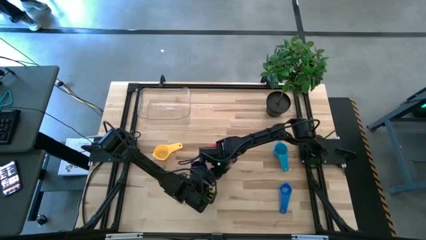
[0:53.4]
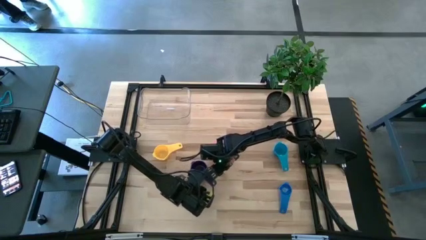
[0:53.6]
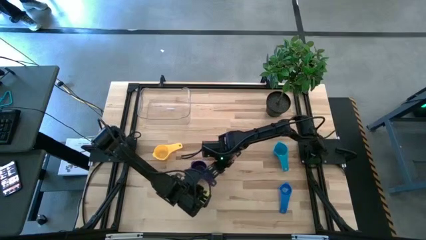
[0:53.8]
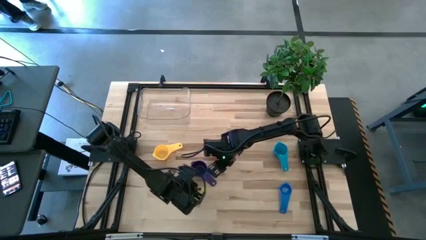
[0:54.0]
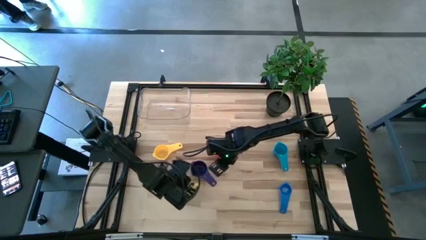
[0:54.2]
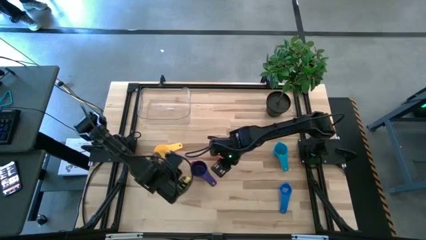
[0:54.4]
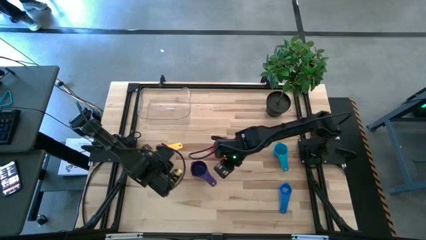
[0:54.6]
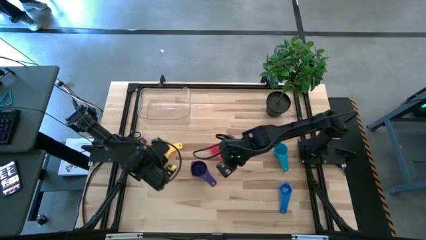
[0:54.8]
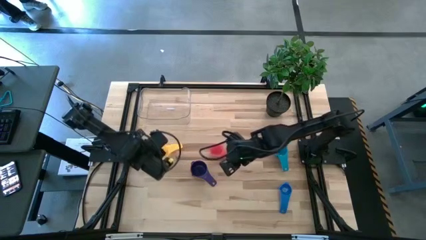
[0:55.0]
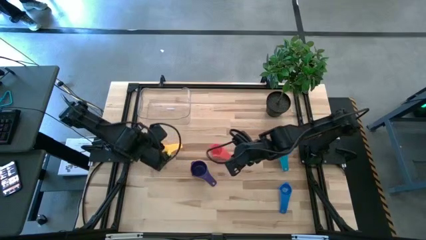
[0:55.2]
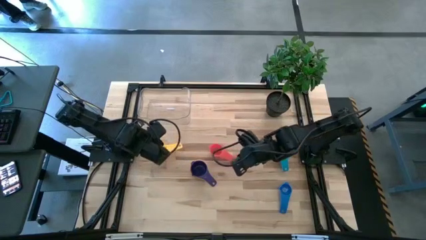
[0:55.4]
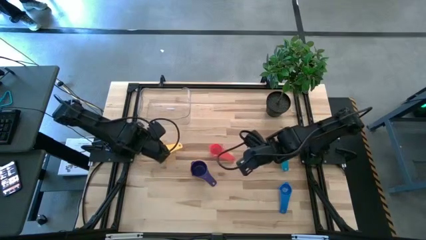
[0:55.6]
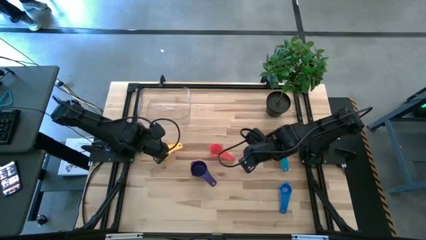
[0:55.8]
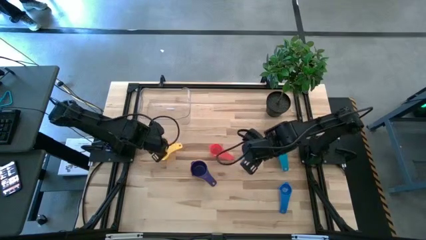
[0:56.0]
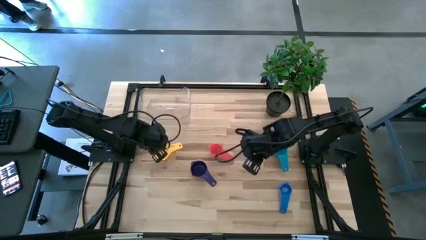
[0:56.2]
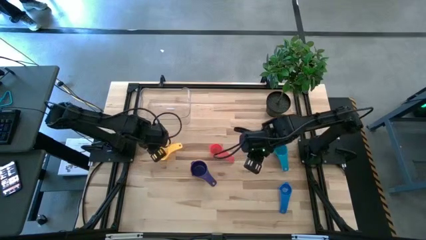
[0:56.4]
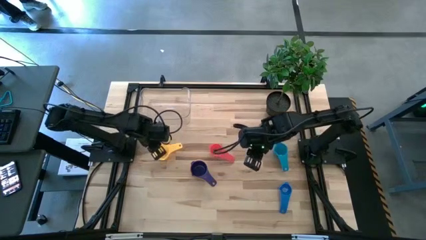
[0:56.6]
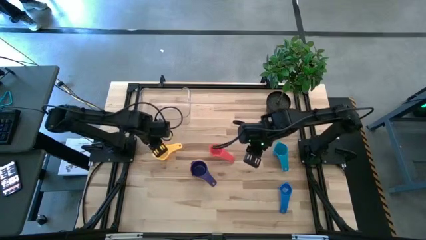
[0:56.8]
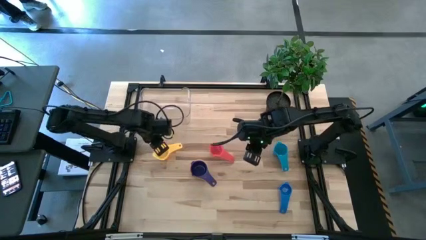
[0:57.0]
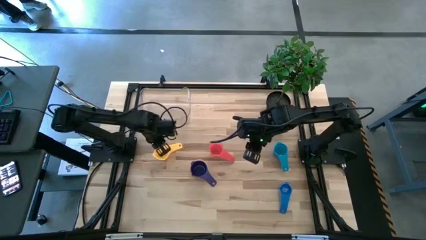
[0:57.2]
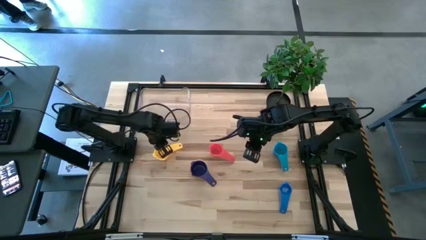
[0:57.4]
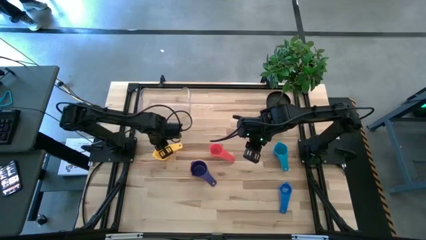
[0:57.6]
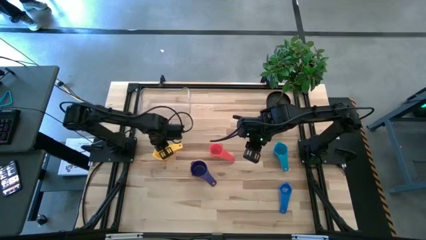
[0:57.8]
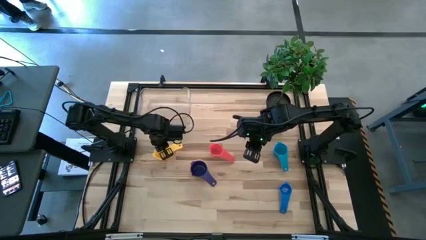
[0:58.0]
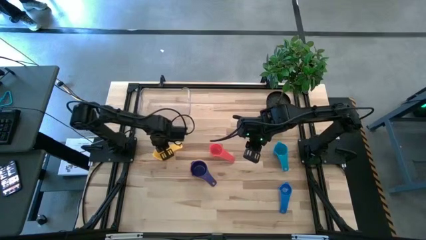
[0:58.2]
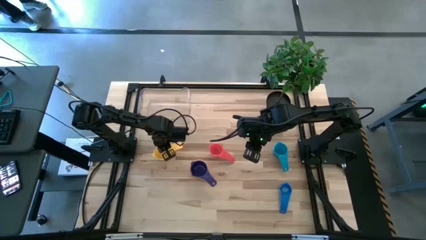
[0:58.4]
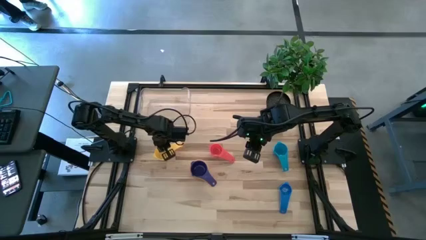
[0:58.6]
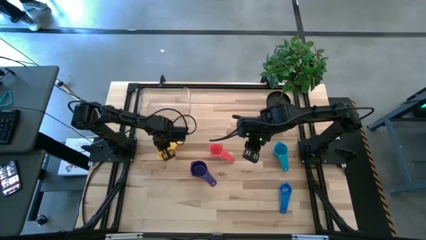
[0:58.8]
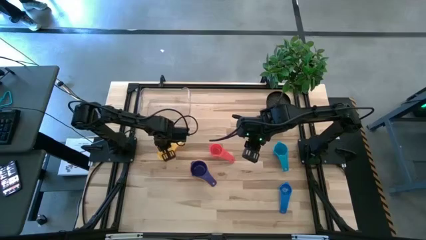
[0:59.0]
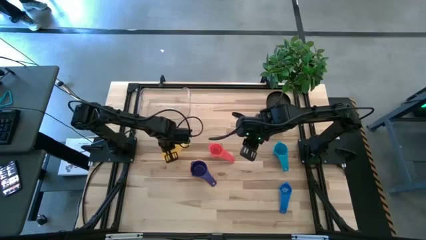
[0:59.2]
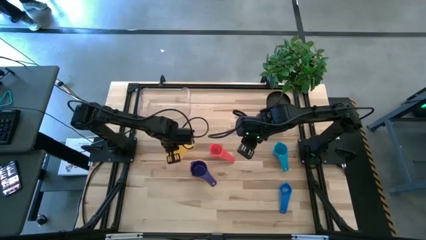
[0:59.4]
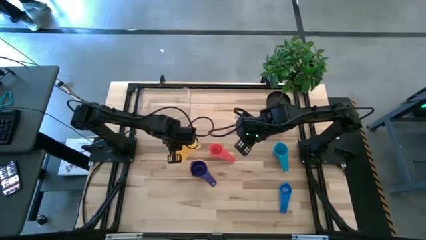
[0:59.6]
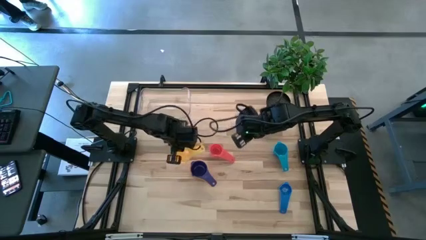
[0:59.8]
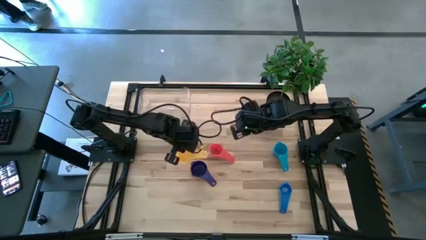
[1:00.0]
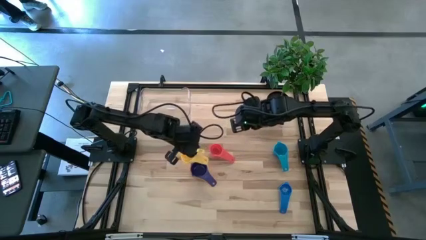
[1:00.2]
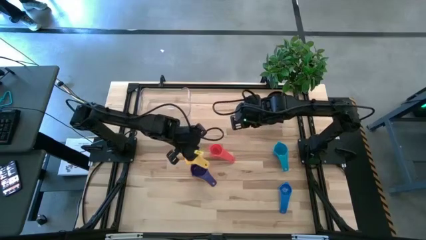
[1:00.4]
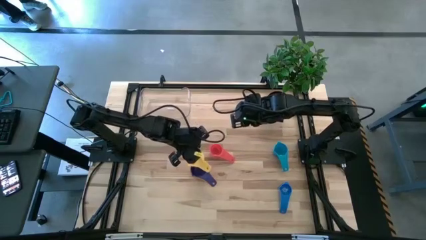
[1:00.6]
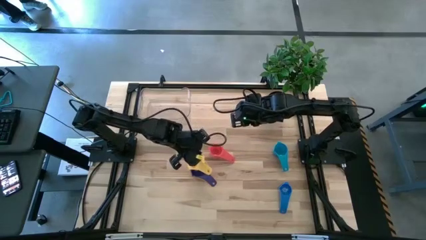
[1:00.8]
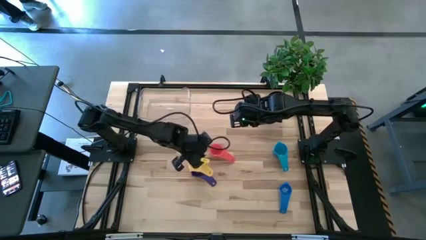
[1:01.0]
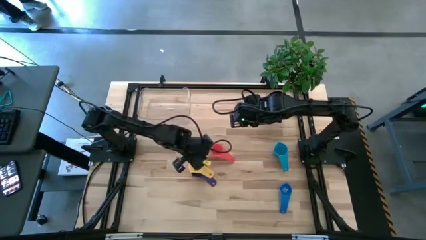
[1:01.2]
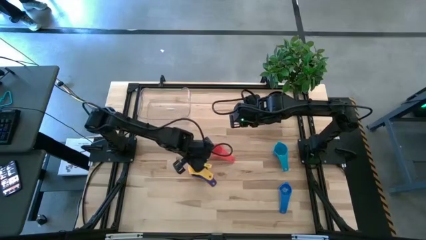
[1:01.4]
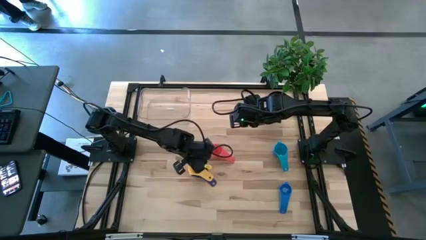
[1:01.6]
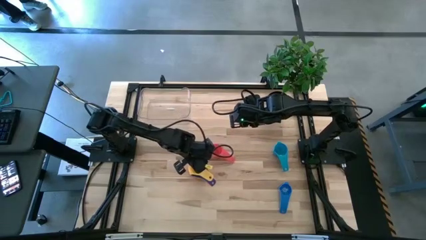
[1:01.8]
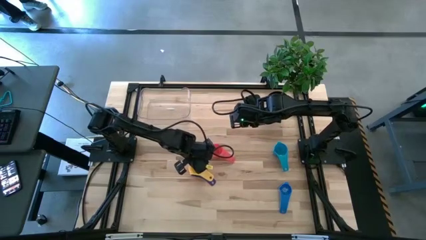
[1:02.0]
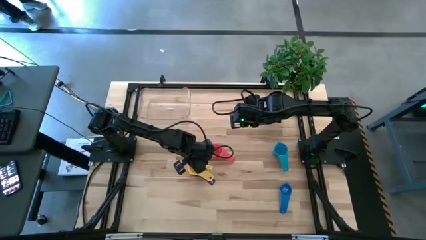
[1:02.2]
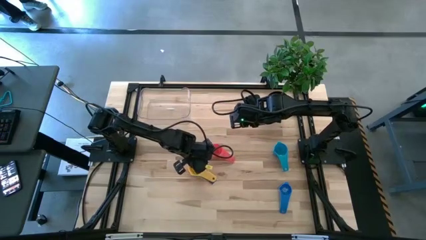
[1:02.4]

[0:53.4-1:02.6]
Task: Nest measuring cups in basket
Stack the yellow measuring cup on top of the violet measuring cup

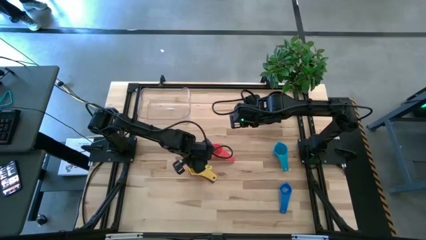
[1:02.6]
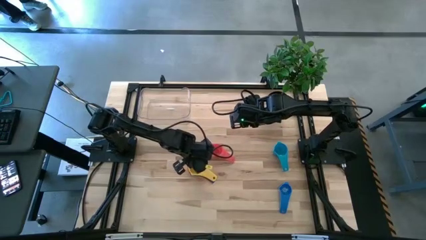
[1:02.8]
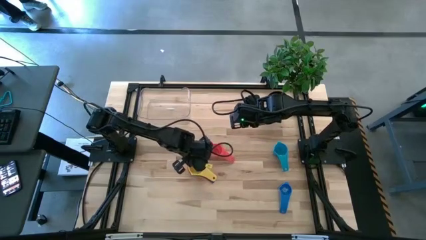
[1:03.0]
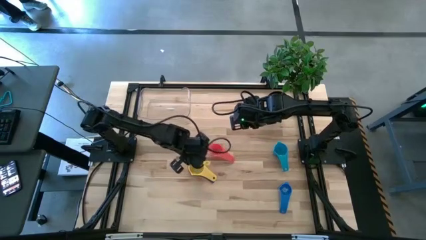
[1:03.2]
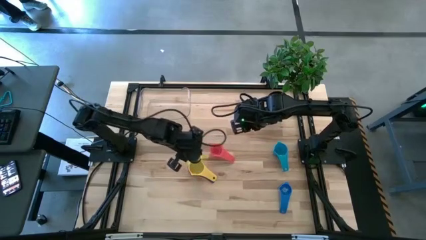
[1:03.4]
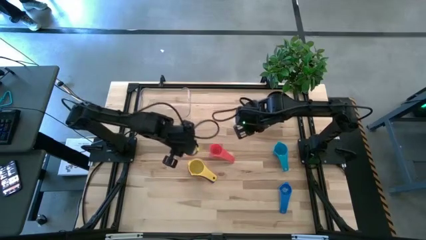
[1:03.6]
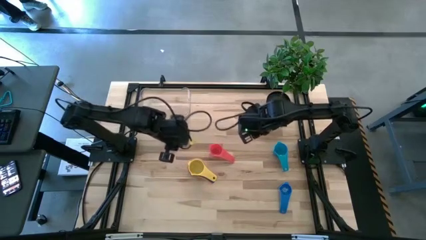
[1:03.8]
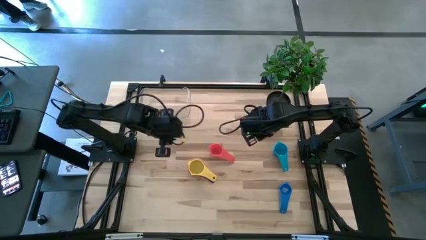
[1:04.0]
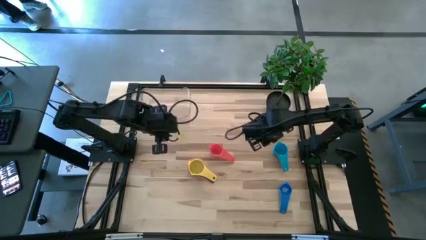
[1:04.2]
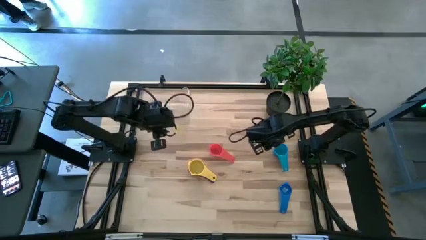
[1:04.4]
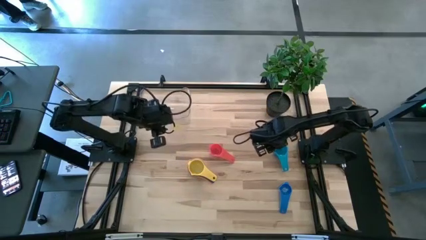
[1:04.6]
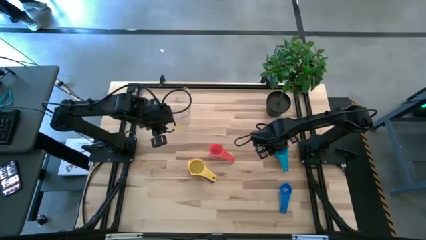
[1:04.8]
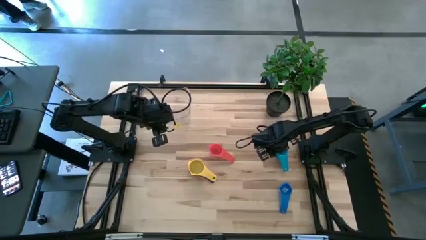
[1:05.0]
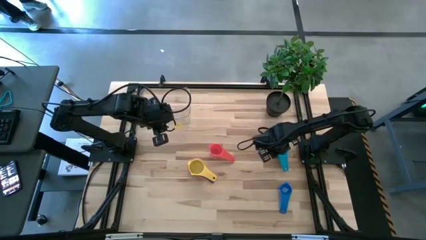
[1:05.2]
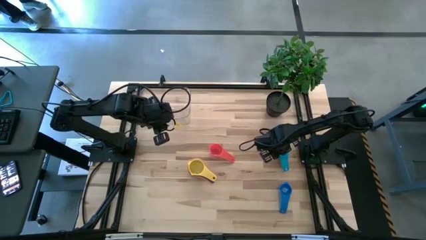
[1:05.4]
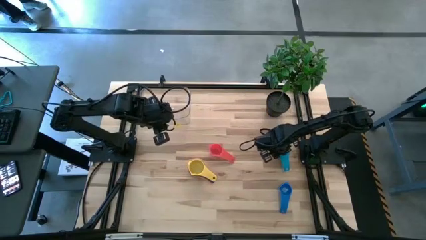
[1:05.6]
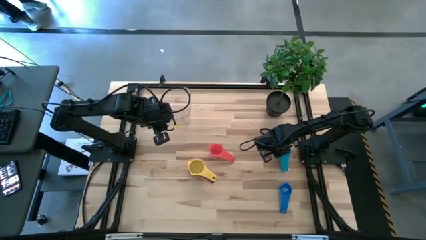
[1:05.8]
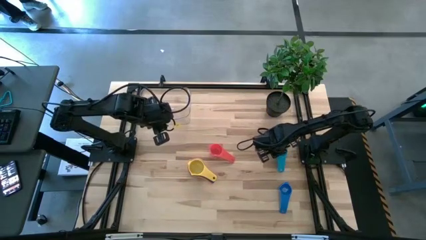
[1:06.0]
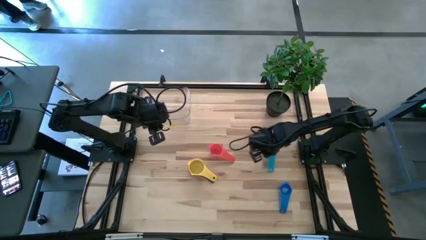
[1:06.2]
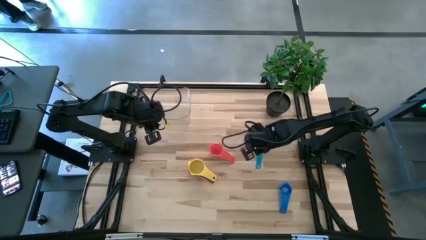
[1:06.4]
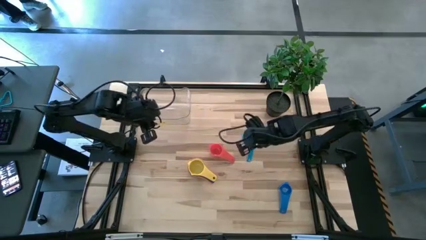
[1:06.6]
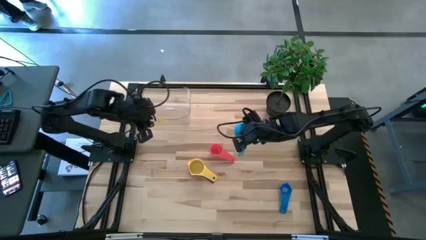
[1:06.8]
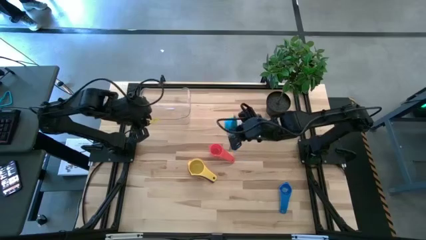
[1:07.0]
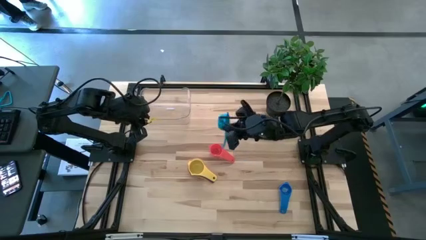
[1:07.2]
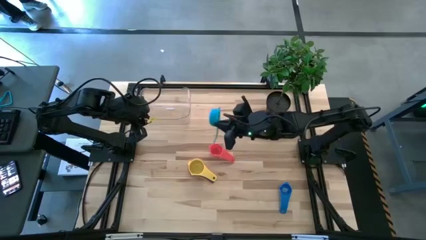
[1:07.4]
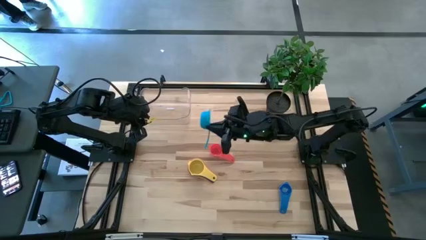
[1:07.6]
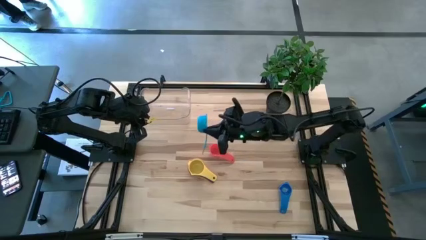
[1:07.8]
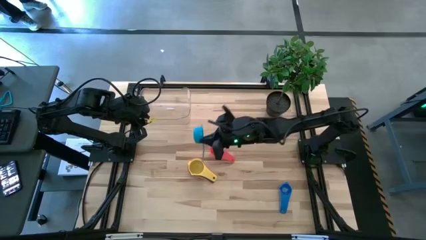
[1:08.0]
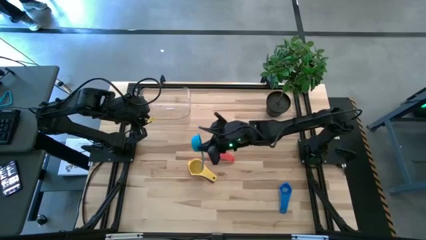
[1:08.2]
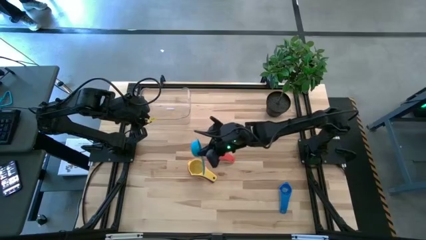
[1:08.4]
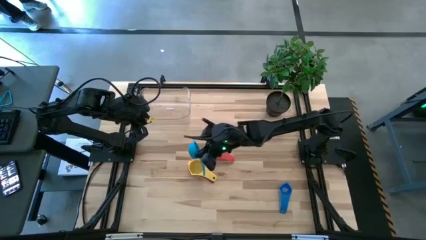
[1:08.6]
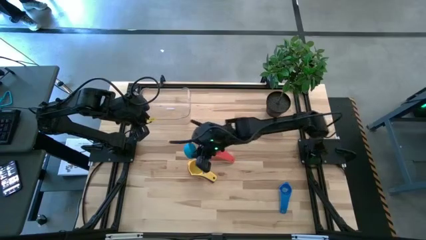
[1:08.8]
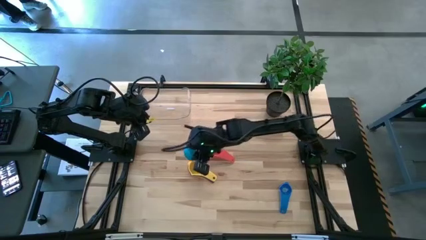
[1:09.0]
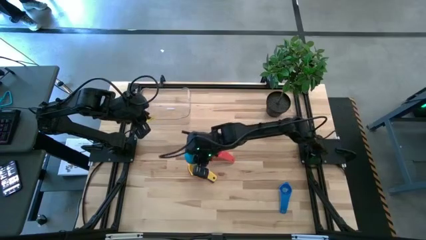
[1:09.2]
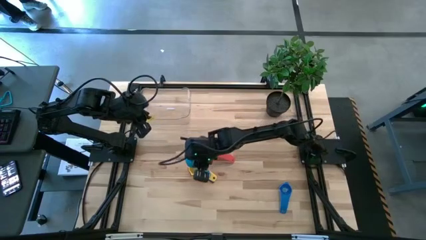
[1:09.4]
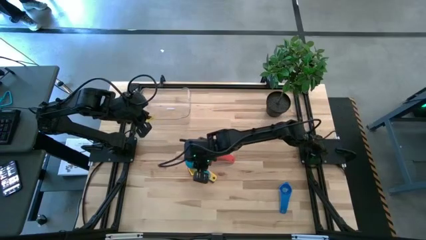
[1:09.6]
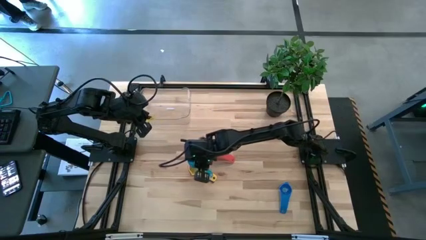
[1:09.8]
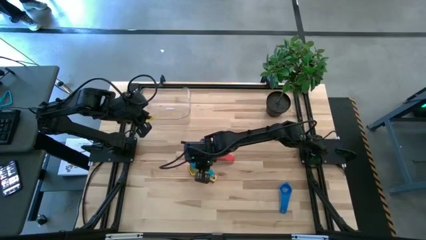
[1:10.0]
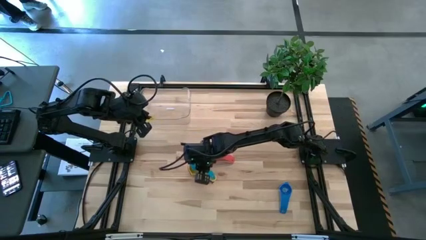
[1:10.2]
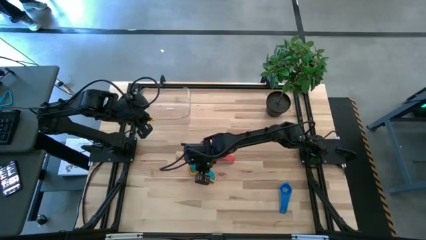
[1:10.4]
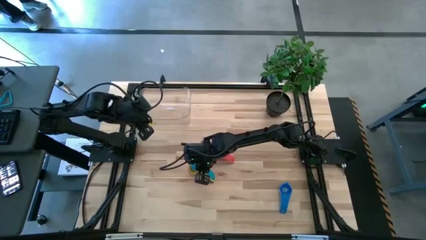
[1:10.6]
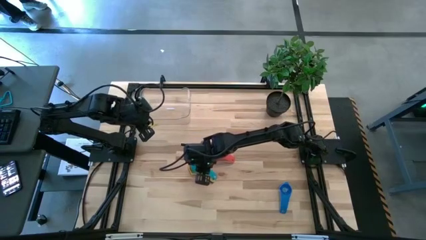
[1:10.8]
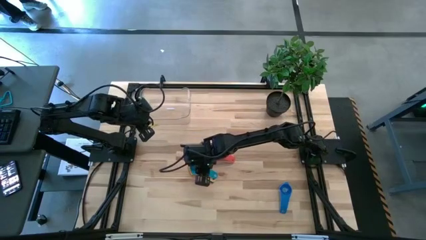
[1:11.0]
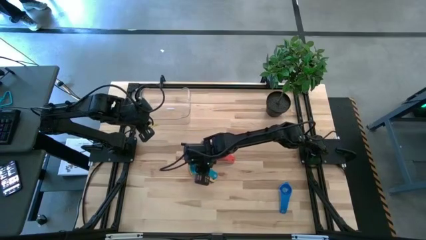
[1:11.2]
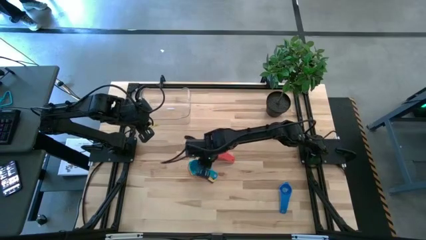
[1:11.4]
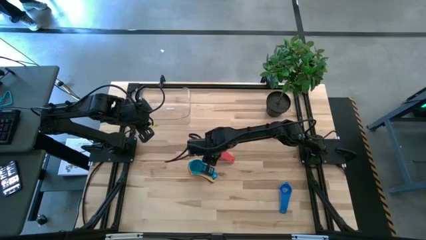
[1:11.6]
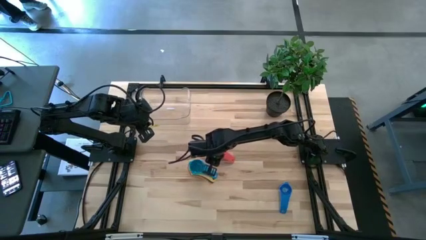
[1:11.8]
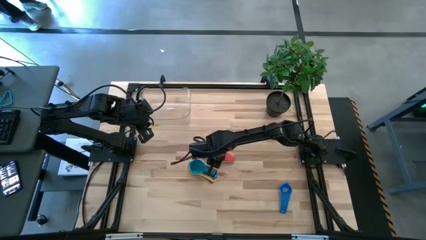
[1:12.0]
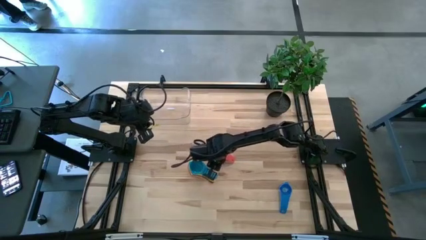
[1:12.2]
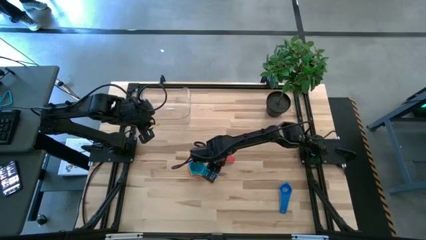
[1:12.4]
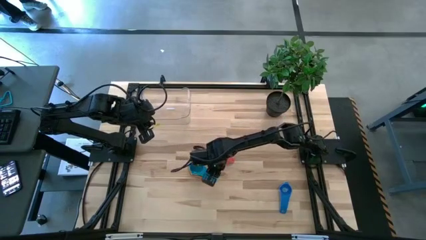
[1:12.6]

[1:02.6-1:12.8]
Stack the light blue measuring cup on top of the yellow measuring cup
